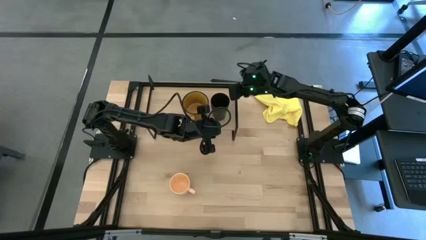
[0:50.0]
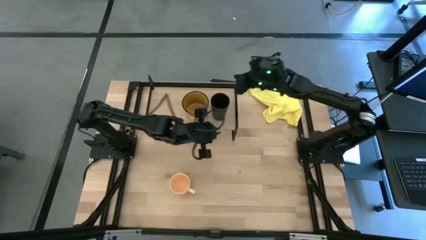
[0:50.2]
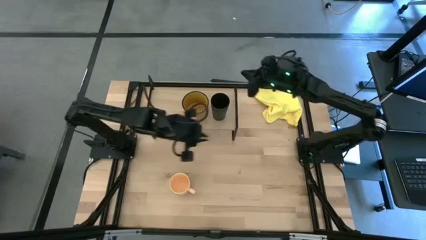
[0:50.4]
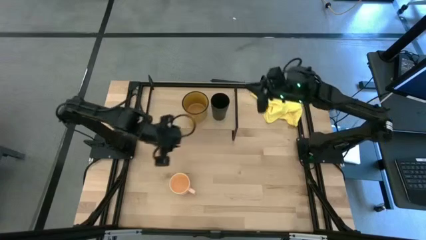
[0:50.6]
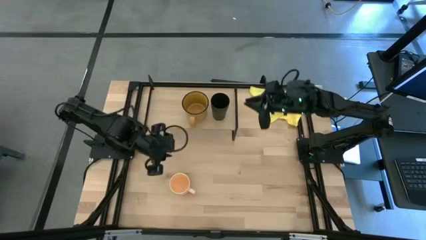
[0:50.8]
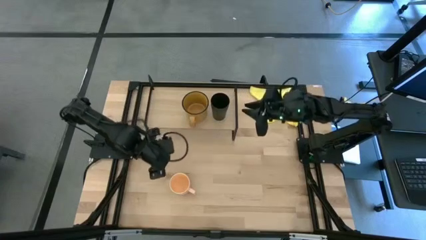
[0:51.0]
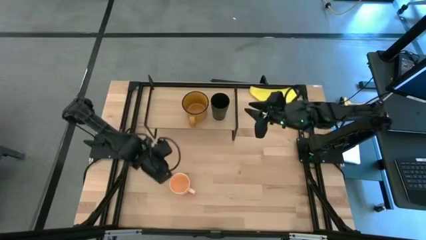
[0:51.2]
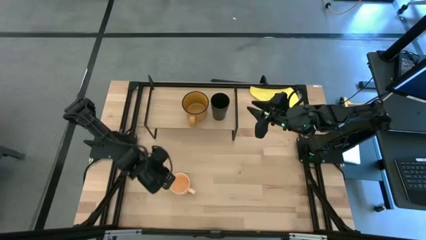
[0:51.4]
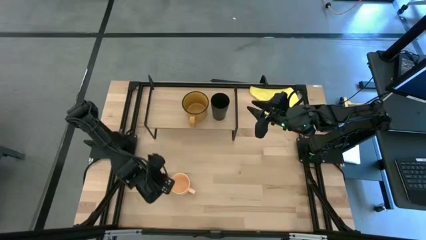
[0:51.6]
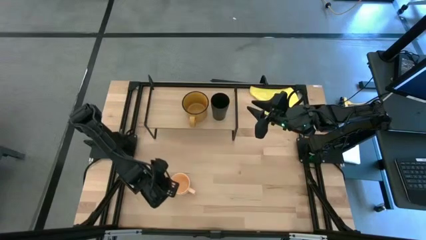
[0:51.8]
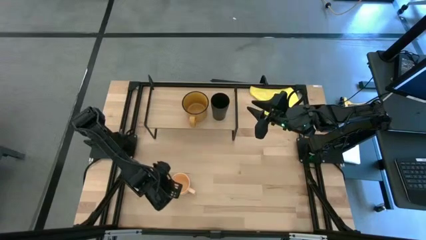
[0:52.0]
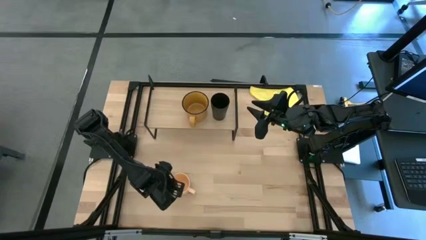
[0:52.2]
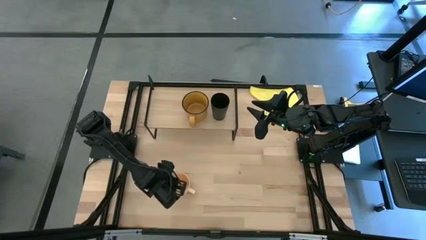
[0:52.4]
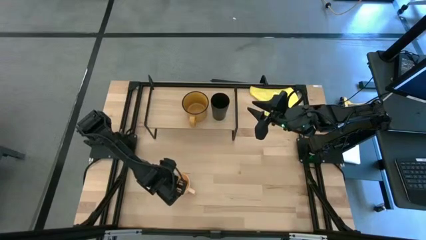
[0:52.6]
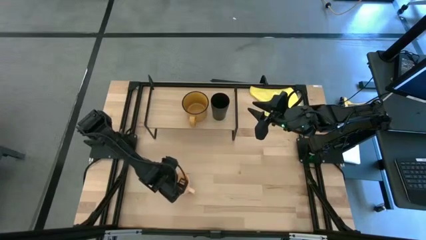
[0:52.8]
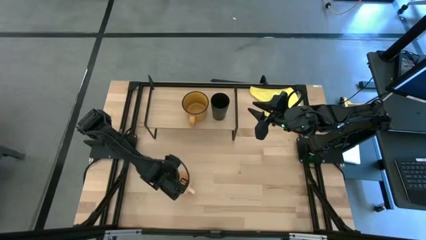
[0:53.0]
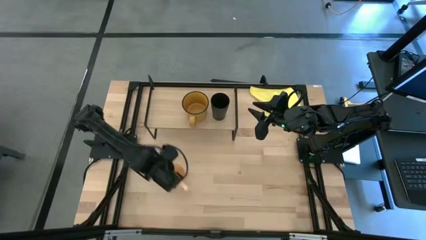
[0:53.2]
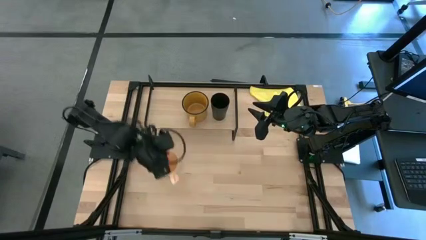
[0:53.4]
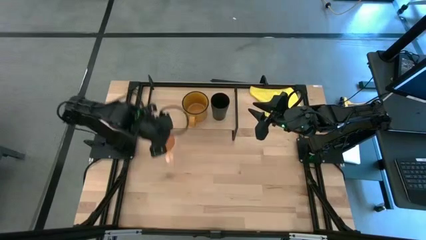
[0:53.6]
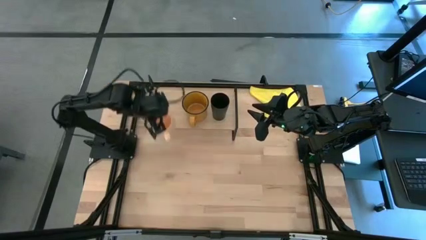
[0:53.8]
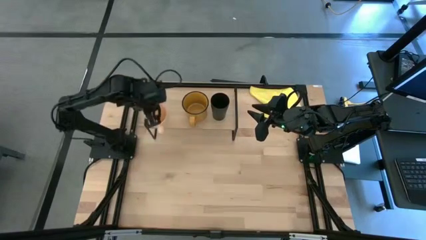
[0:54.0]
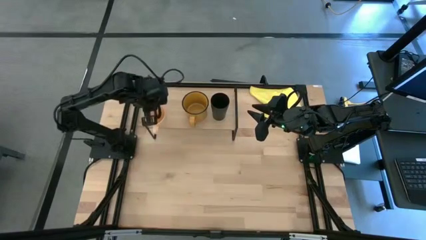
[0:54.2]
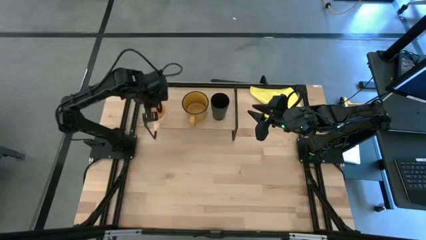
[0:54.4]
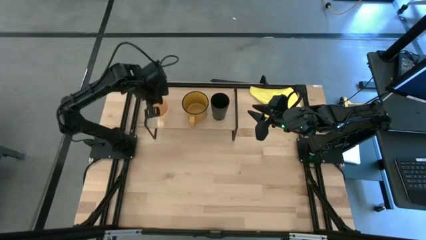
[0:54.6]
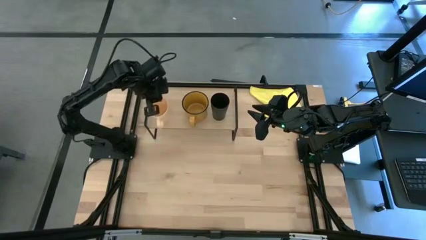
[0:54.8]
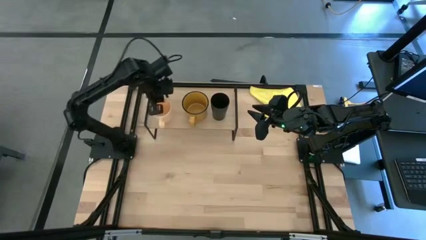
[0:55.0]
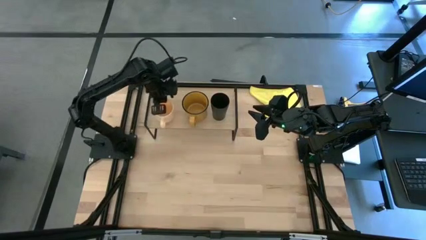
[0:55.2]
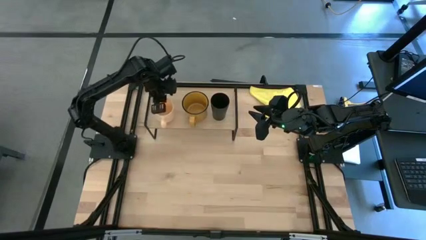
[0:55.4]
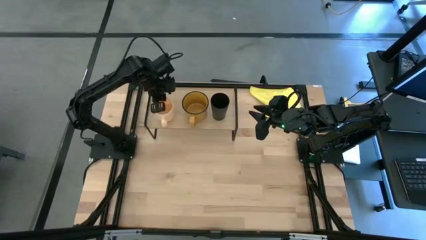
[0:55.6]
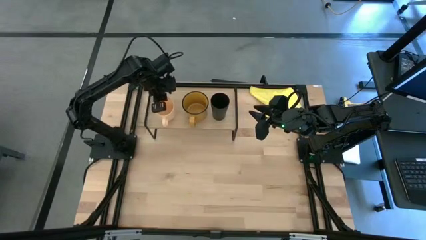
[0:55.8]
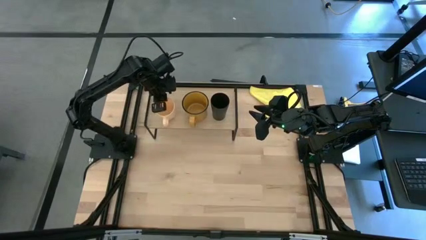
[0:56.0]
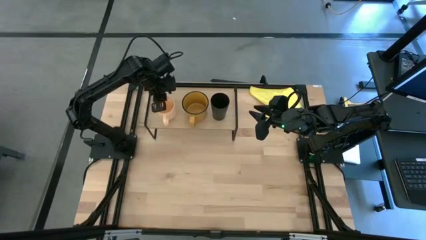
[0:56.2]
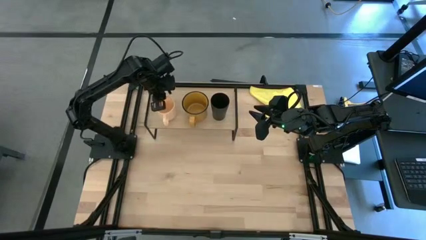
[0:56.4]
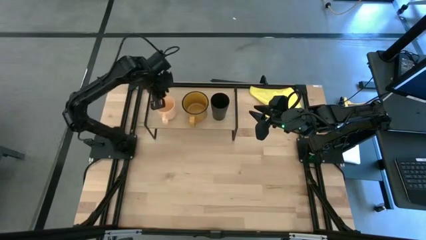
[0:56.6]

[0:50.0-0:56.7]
Task: Stack small to large cups/mugs on shelf
Put the light orange mug on the shelf

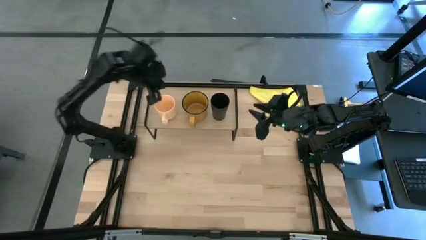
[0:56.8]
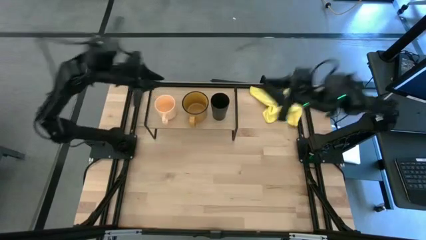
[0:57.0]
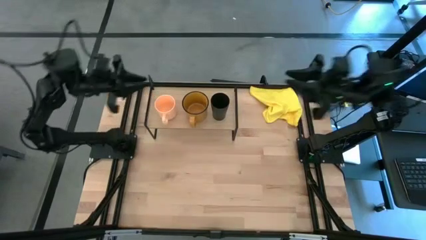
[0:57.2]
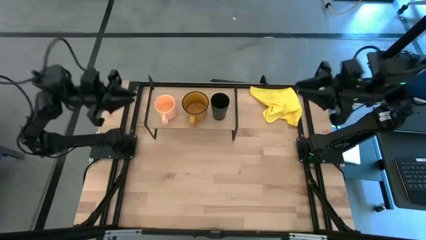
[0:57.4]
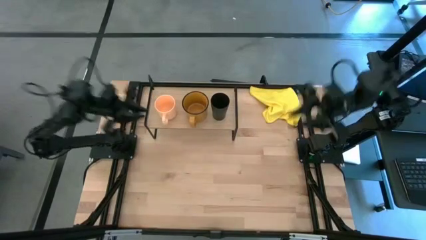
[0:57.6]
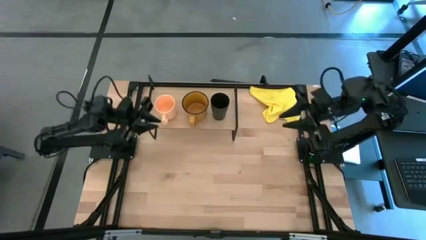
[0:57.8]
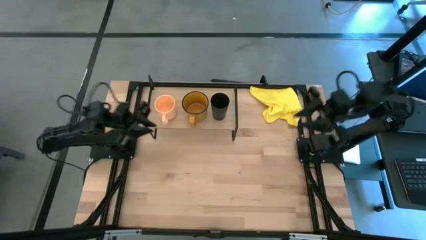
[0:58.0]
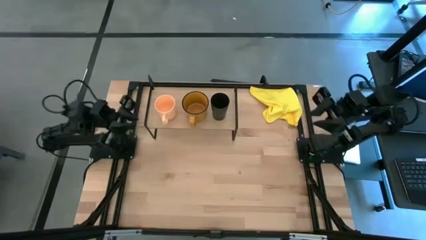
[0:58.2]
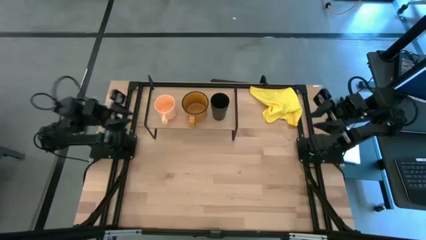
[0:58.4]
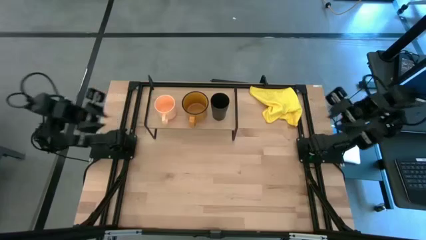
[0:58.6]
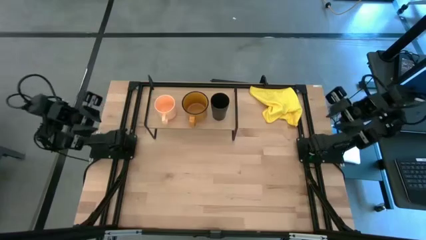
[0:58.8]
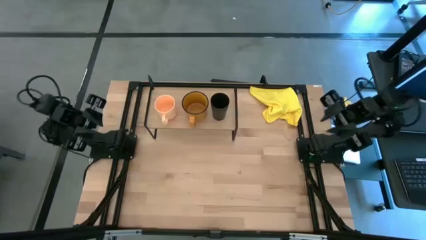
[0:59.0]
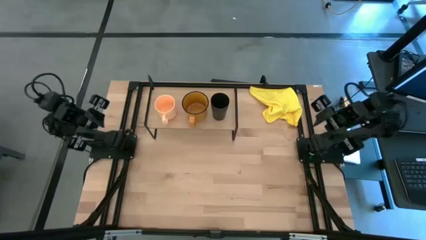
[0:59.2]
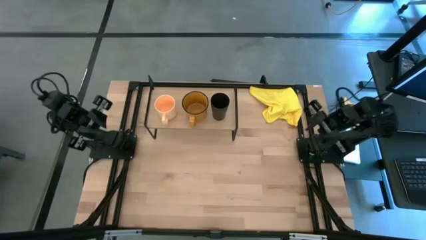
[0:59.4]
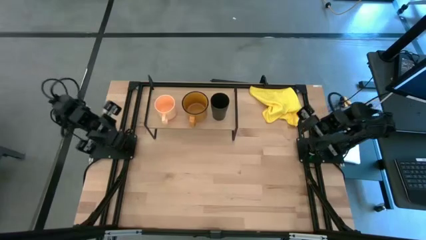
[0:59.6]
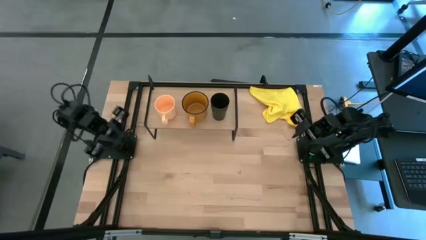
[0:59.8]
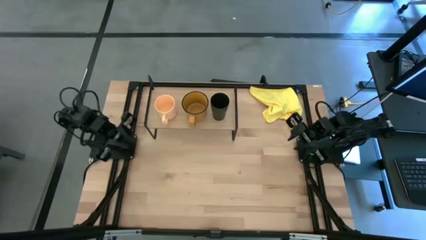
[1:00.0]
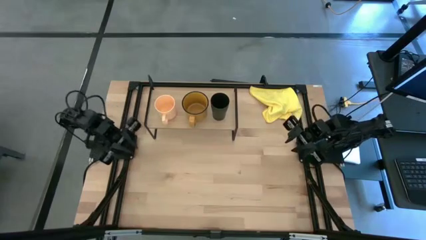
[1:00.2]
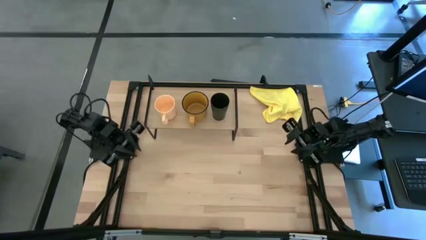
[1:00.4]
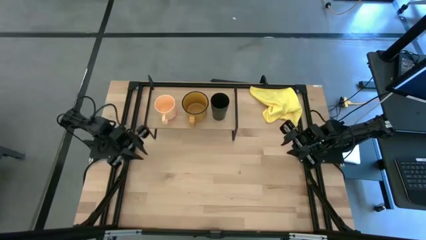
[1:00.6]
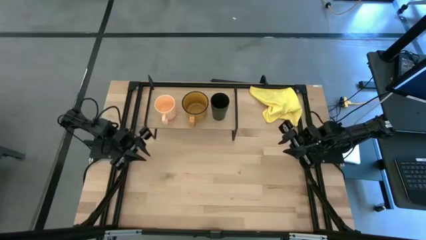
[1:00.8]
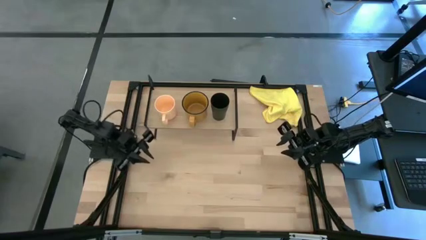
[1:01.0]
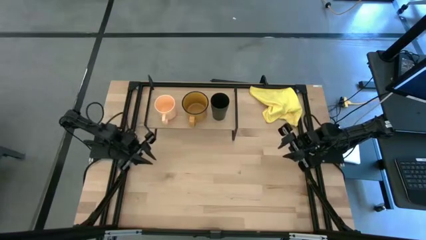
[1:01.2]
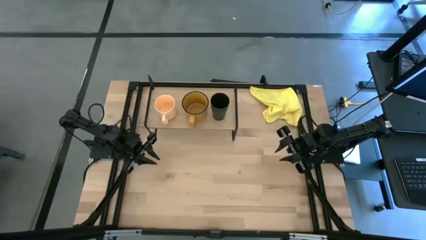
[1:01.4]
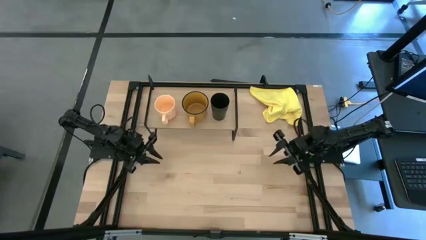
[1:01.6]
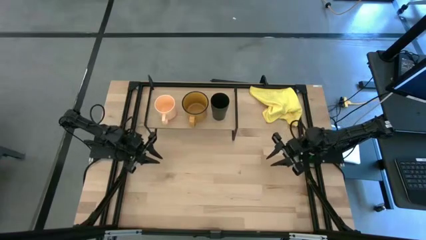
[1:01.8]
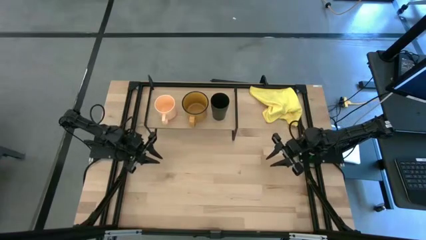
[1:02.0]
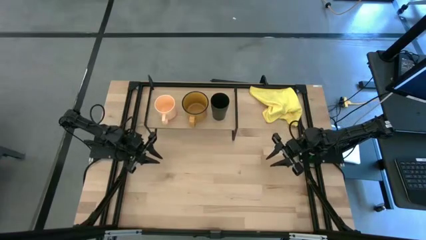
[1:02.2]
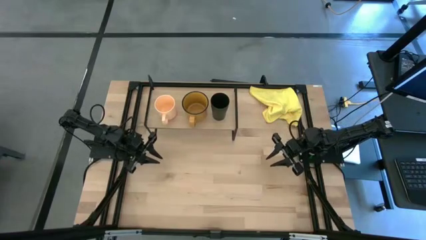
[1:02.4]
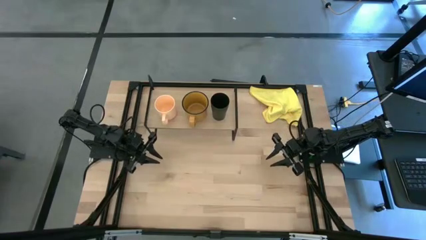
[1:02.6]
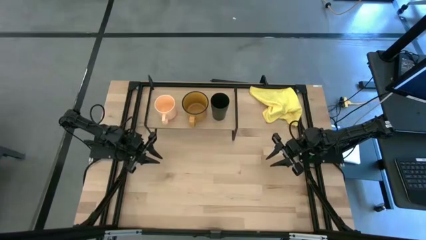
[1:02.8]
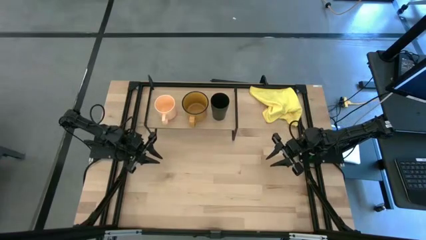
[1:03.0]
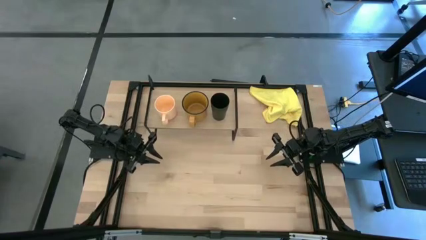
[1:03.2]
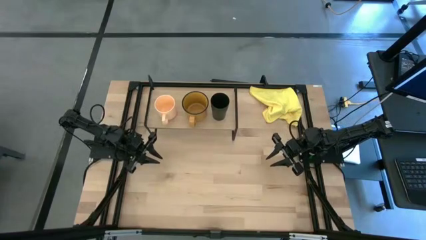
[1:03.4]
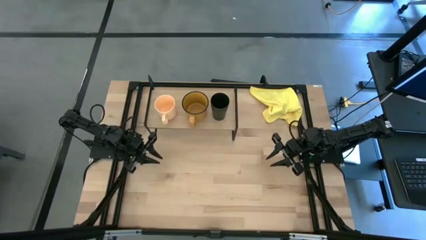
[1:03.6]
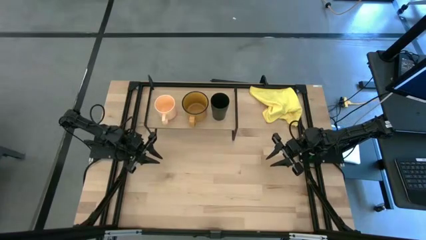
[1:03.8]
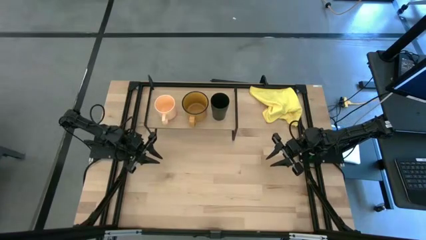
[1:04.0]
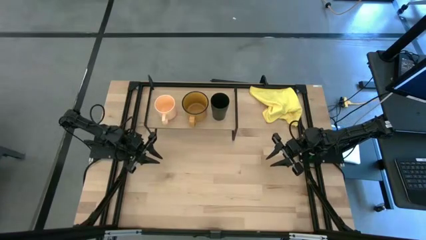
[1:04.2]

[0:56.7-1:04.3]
Return to Home Position

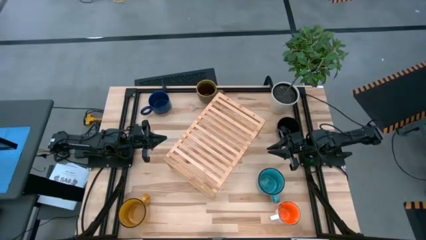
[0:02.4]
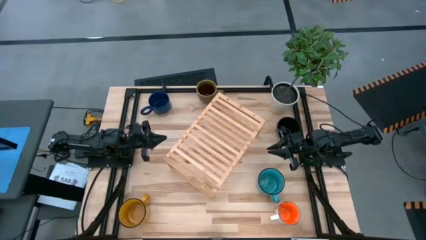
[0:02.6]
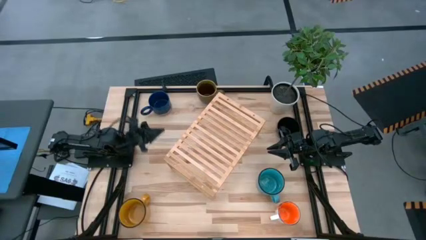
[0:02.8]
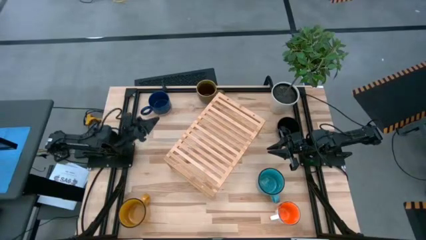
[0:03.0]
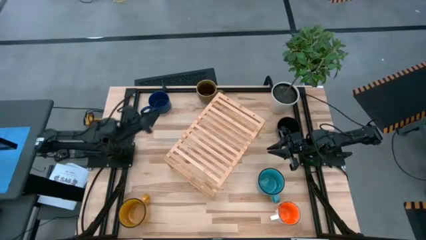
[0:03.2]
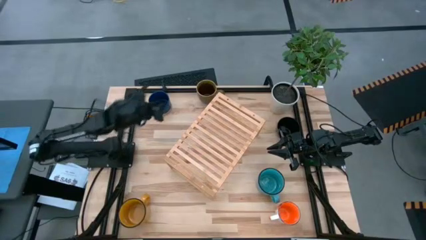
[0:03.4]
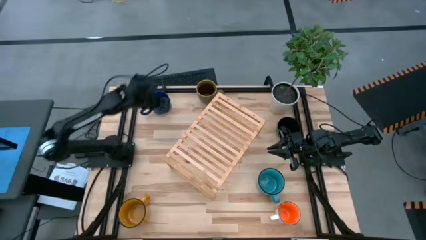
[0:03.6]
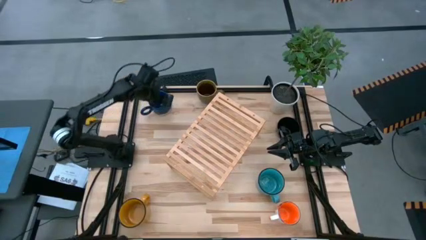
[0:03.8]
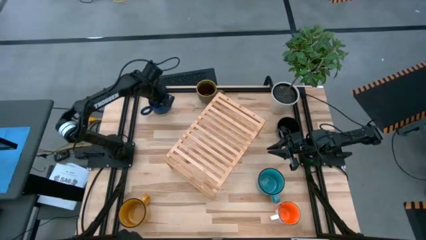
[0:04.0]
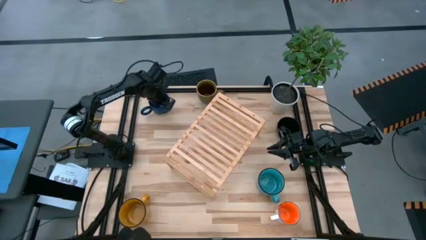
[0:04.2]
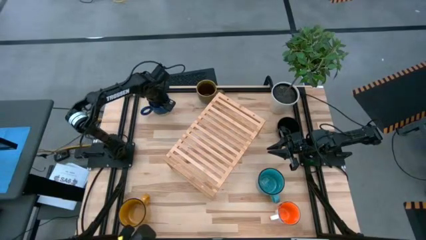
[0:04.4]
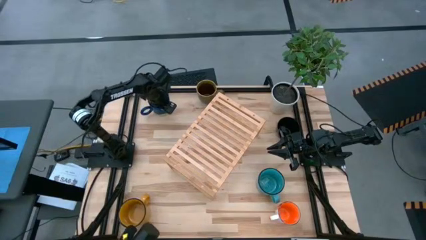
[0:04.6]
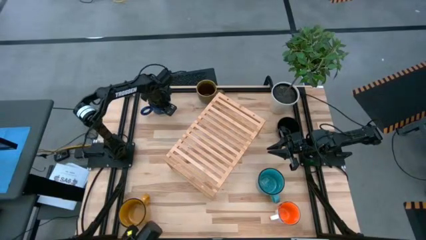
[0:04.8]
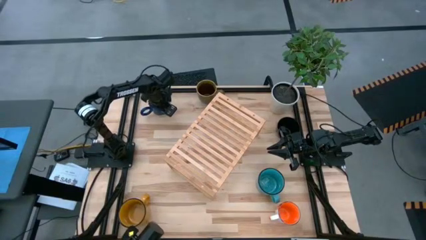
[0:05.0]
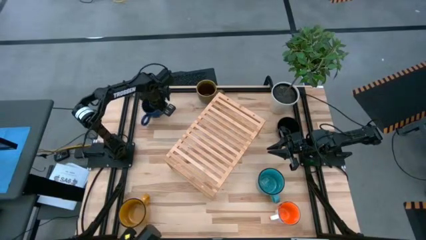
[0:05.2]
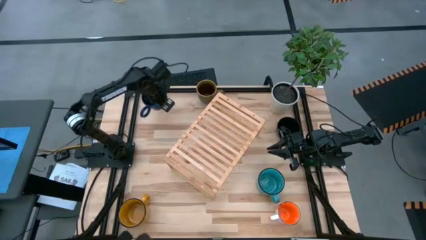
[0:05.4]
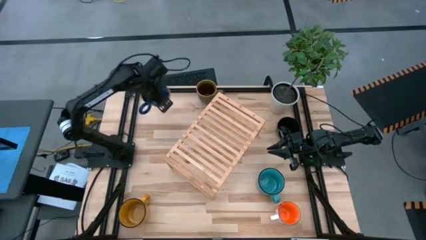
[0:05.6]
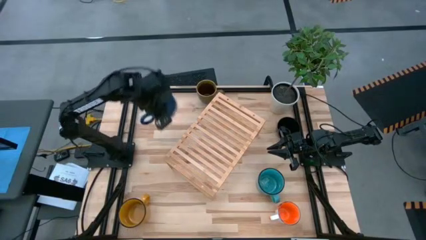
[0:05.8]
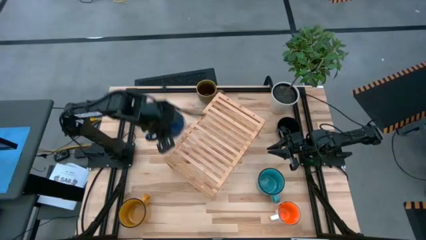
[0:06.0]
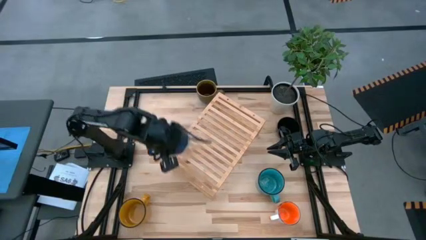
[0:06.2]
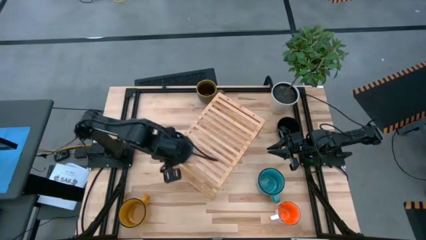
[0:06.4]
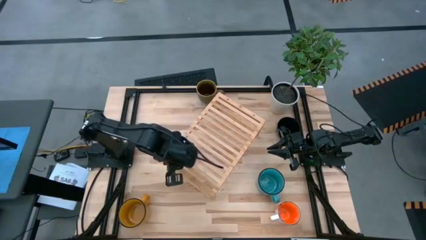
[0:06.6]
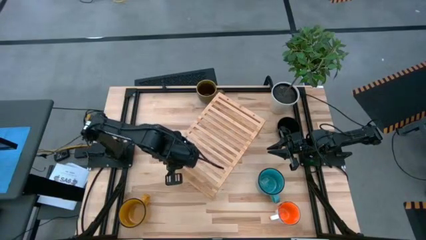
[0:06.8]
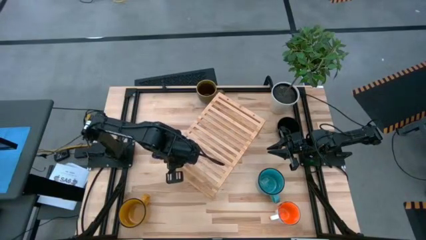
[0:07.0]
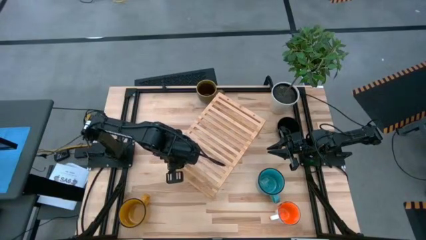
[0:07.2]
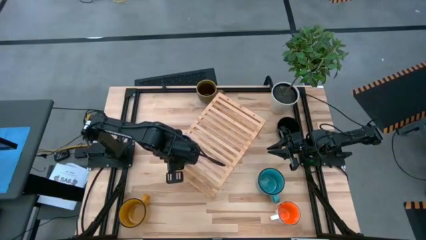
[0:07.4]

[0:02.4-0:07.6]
Task: Place coffee mugs
Put the dark blue mug on the shelf
